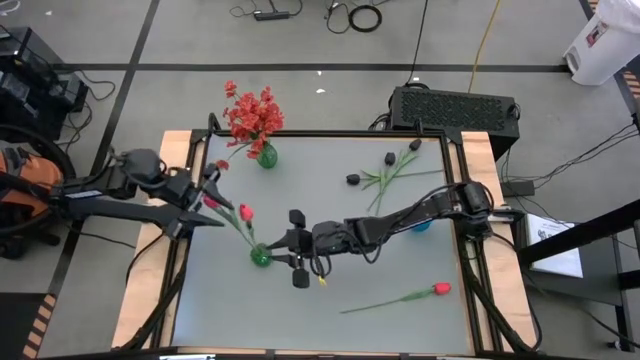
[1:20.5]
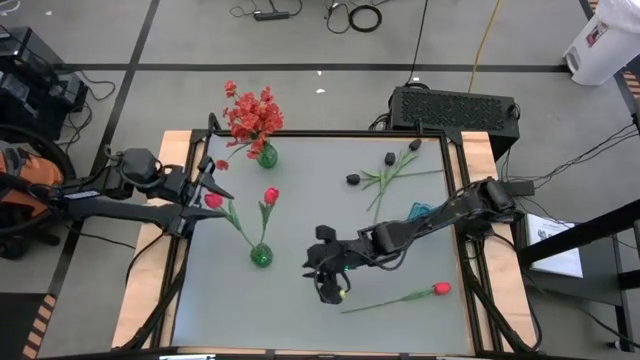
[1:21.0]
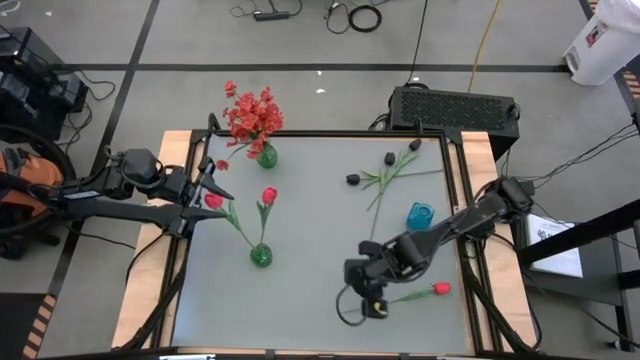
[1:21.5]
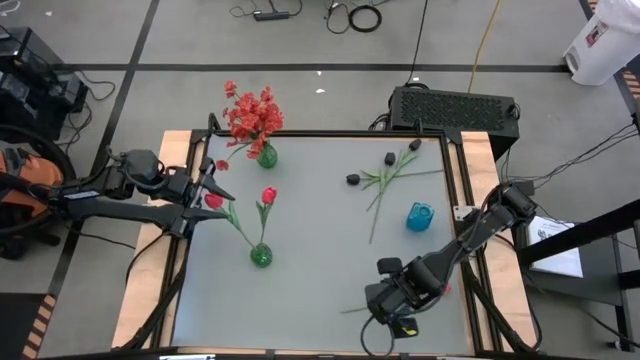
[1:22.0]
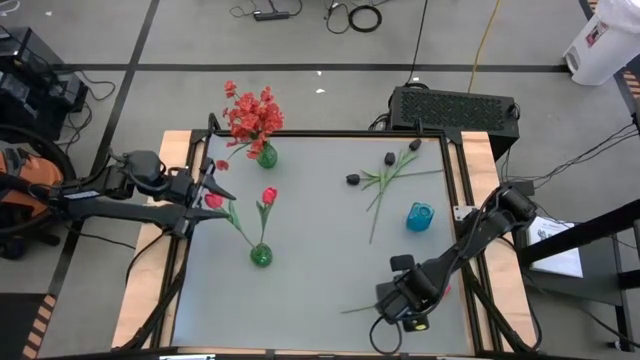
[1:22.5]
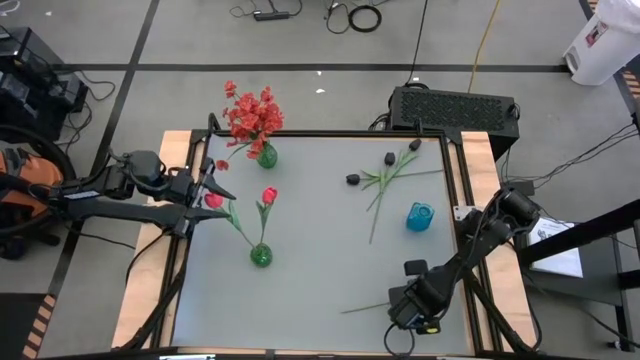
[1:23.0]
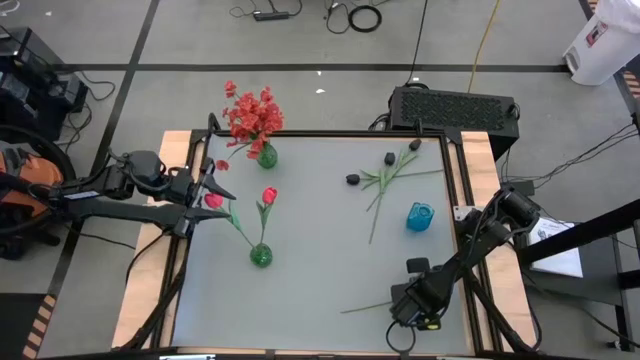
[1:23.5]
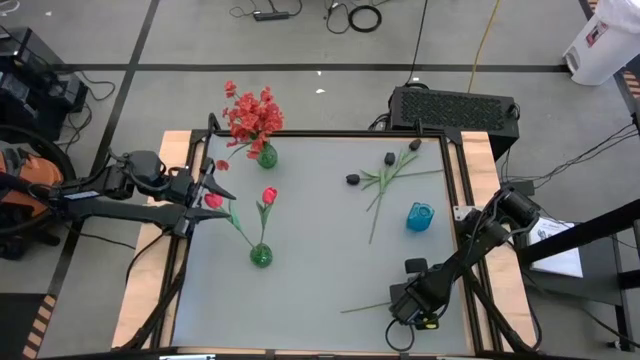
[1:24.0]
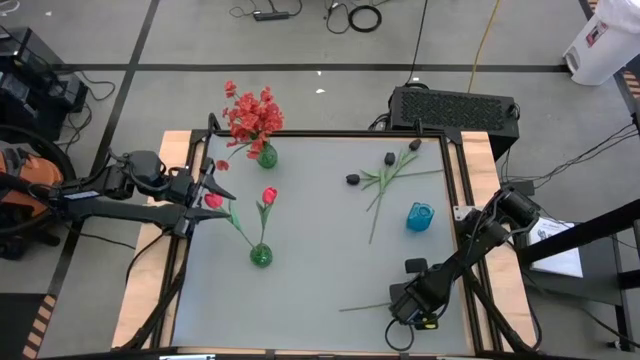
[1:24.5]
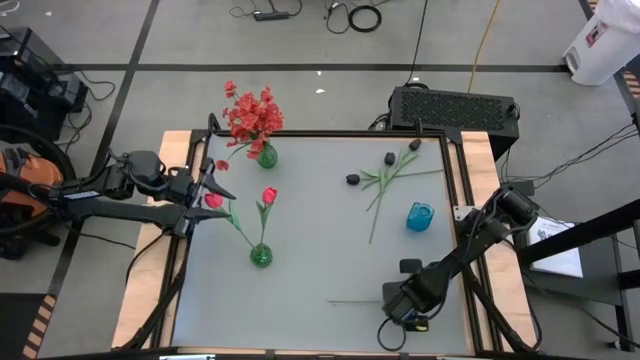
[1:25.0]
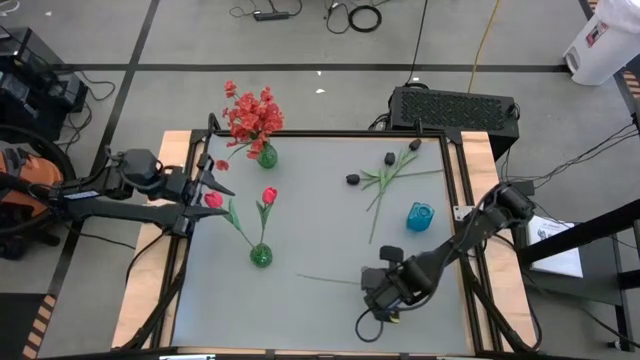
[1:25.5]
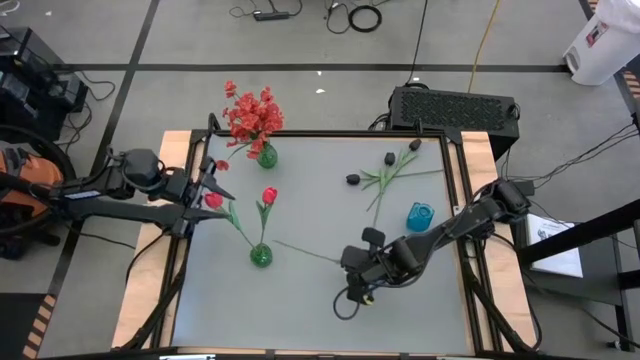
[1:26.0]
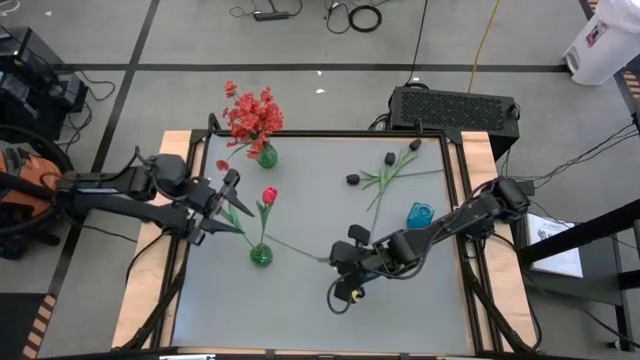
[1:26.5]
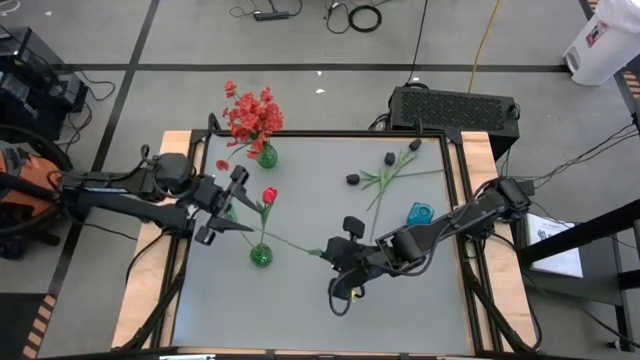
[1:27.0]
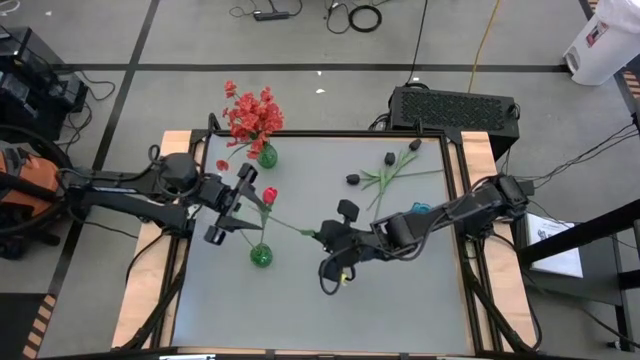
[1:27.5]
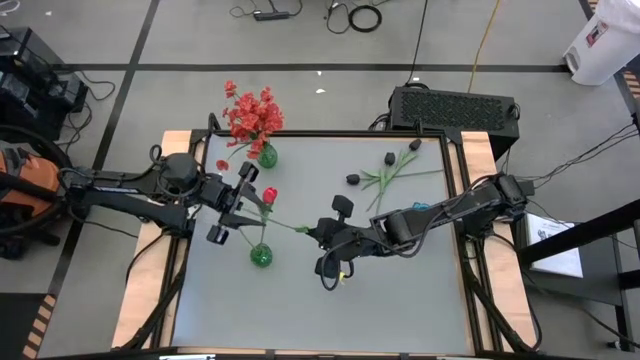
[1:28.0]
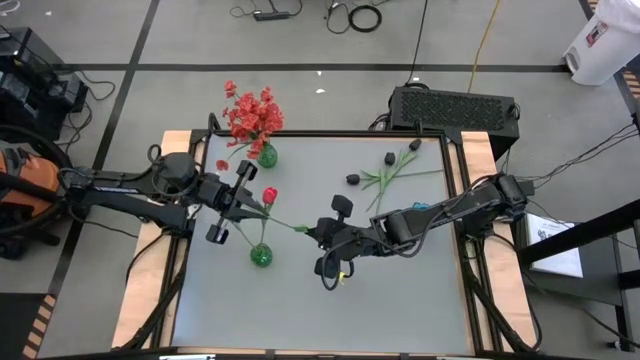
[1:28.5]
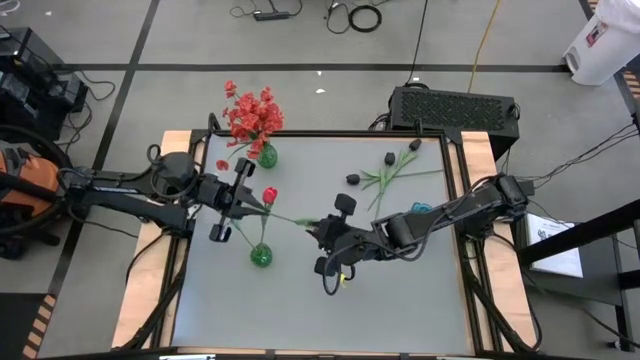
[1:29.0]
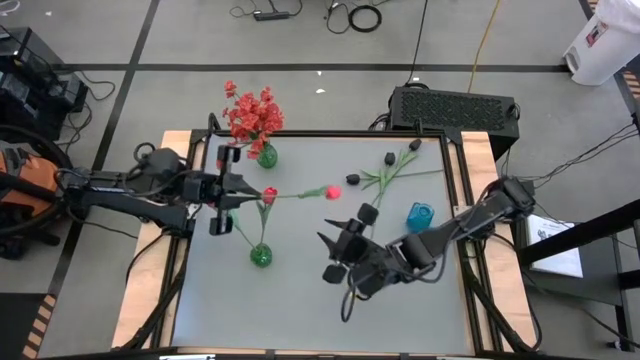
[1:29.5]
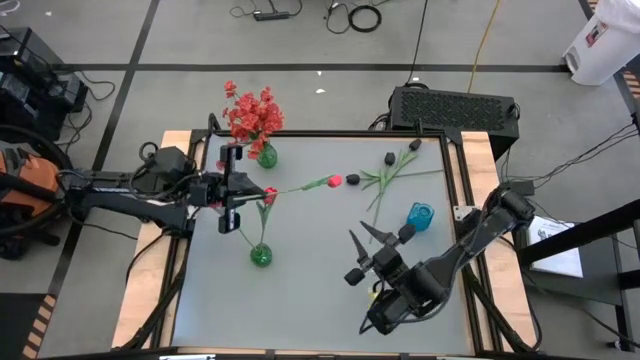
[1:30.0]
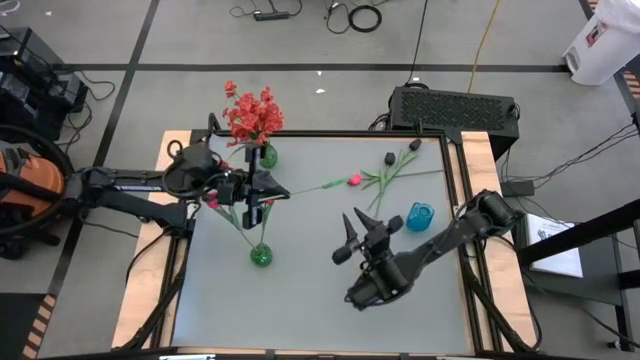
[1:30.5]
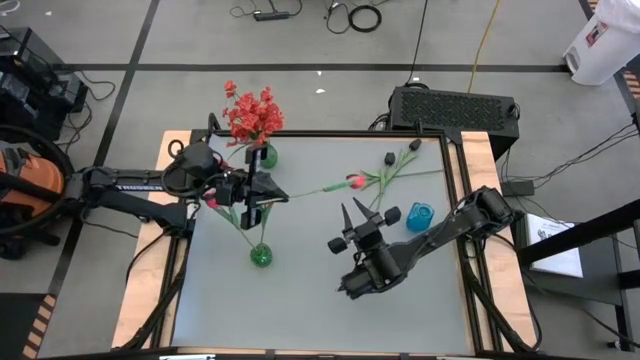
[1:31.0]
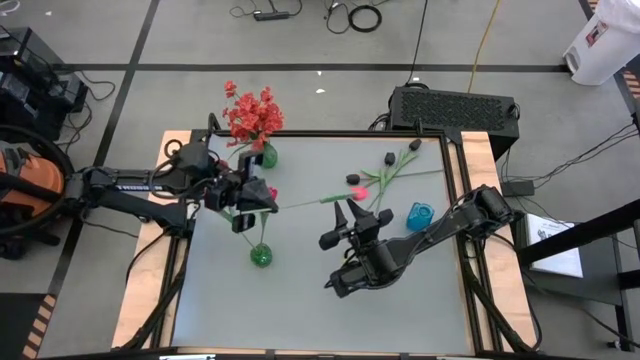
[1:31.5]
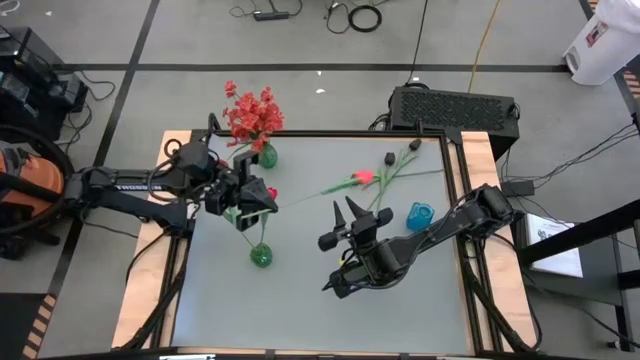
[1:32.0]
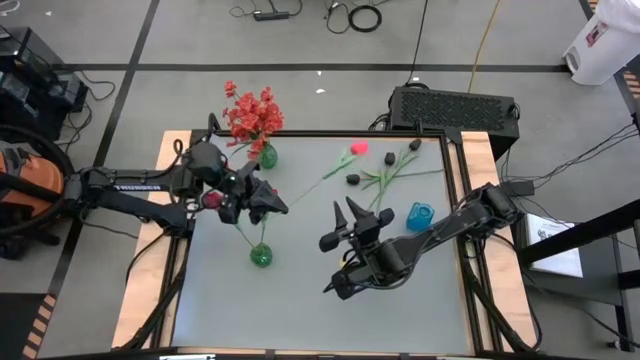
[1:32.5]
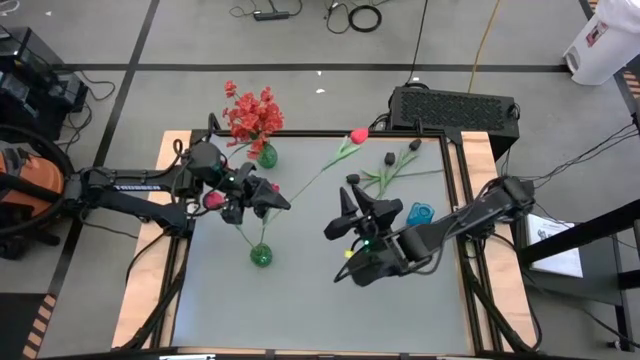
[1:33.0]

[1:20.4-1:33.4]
Task: Sort flowers into vase by color
Put the red flower into the bottom green vase

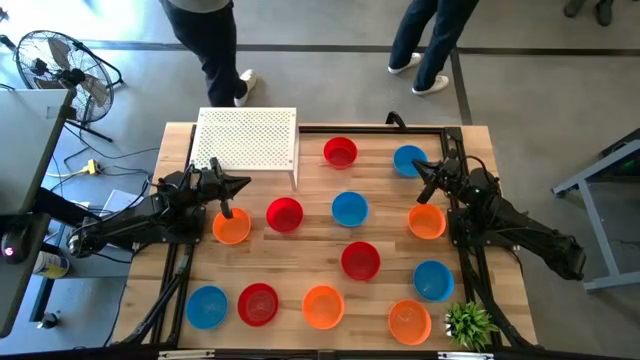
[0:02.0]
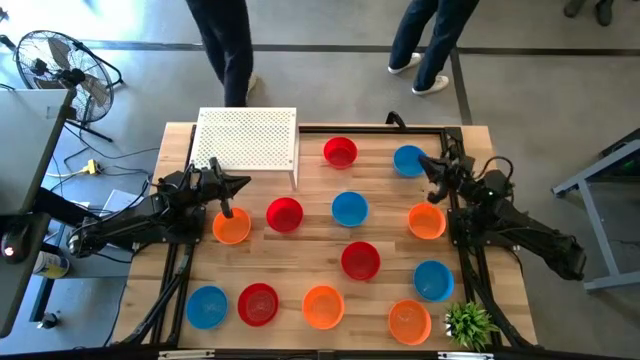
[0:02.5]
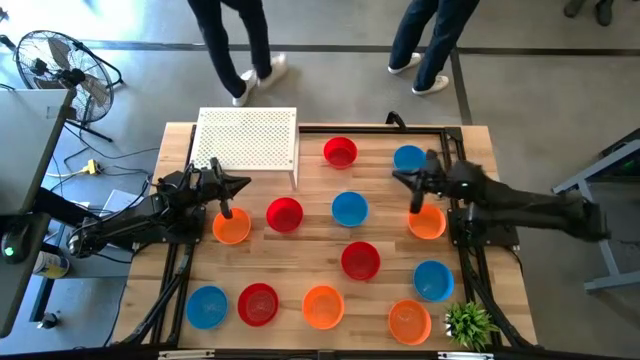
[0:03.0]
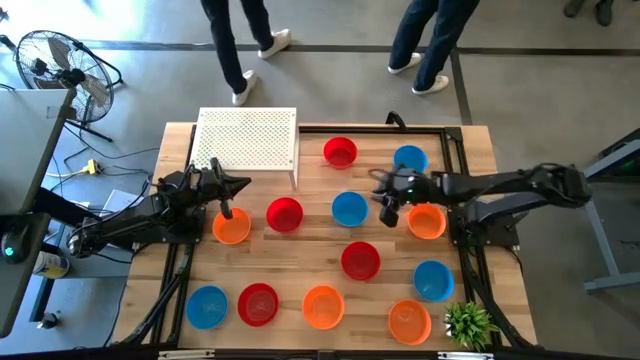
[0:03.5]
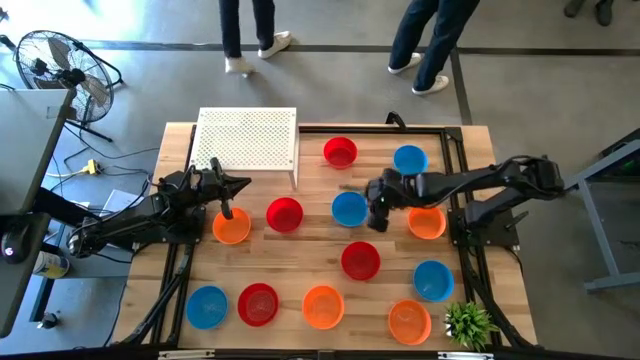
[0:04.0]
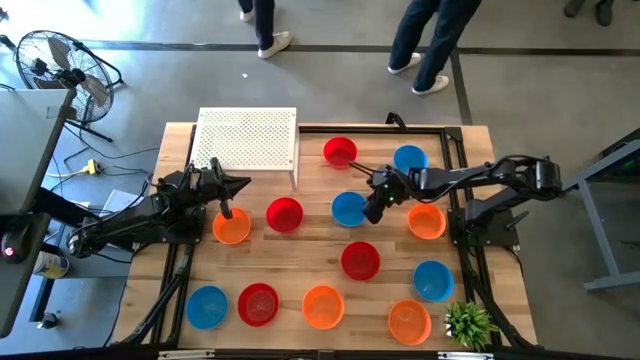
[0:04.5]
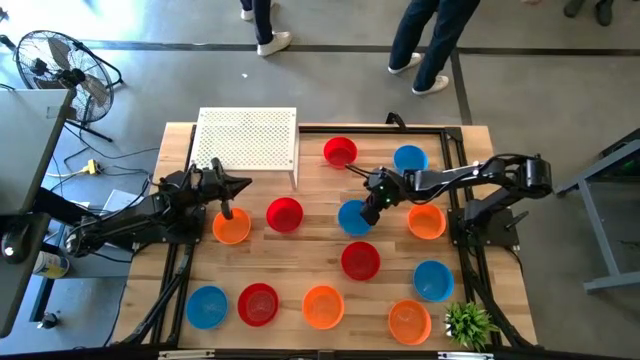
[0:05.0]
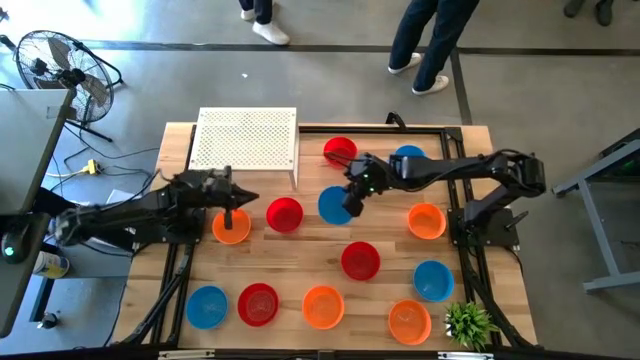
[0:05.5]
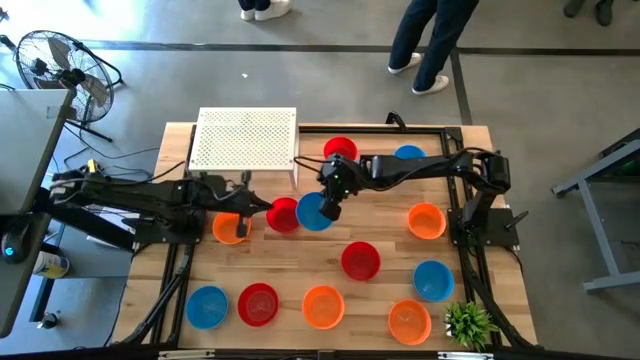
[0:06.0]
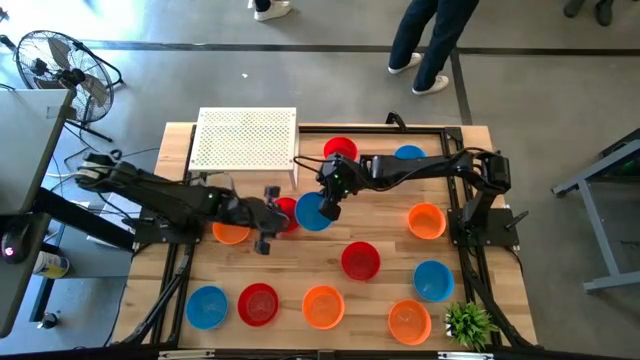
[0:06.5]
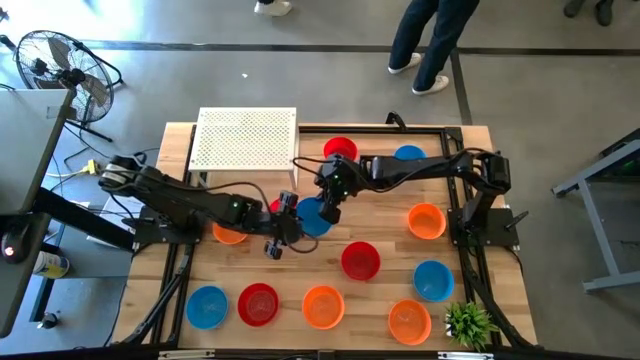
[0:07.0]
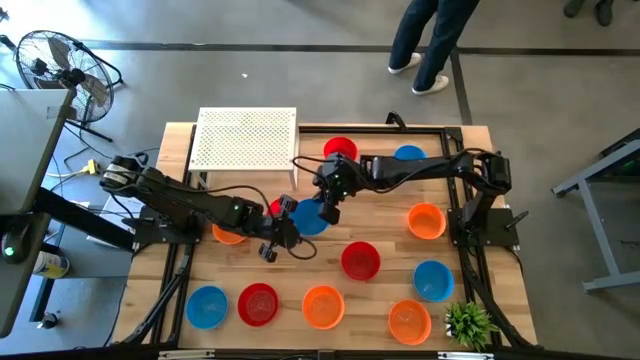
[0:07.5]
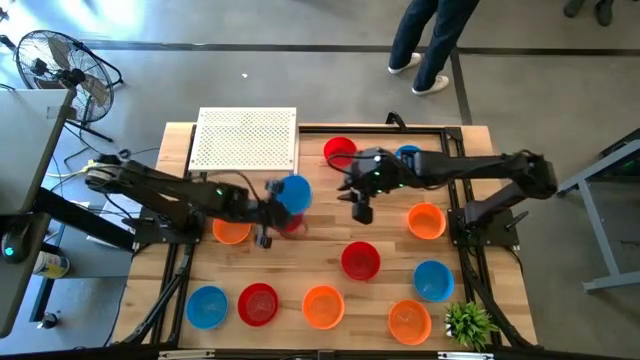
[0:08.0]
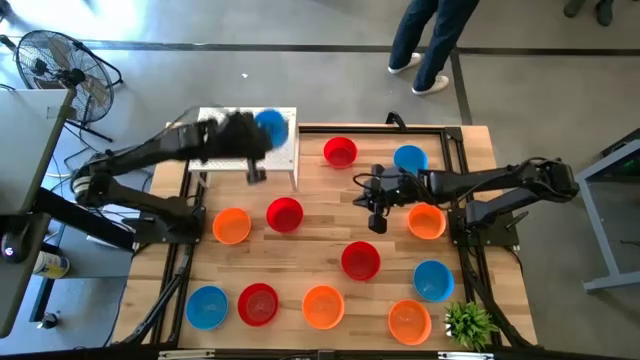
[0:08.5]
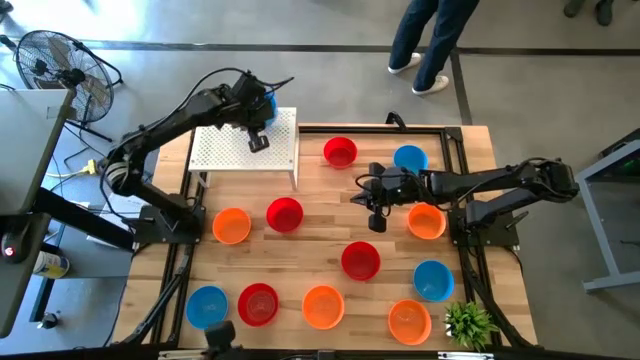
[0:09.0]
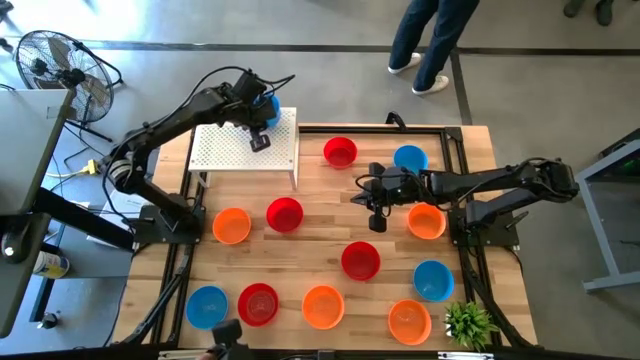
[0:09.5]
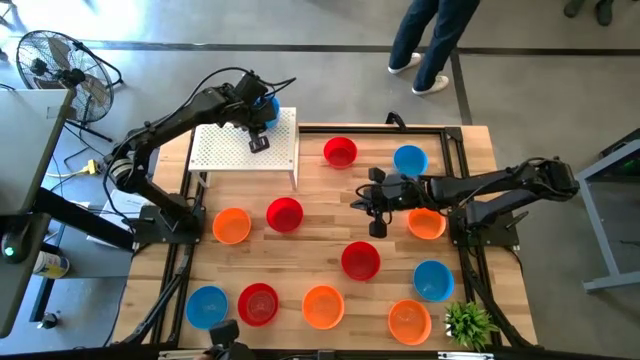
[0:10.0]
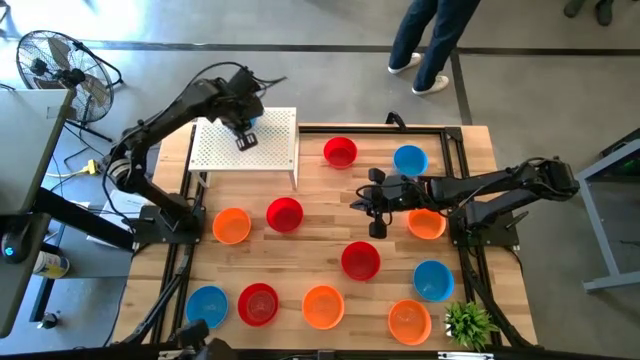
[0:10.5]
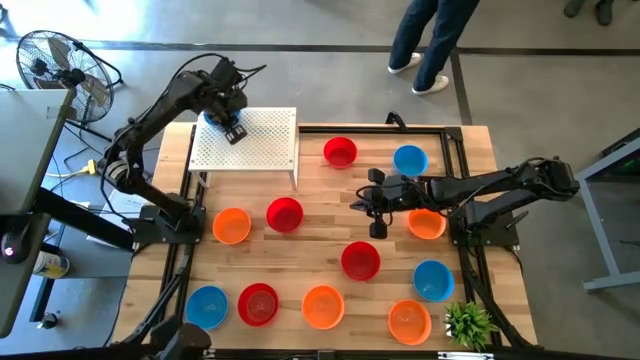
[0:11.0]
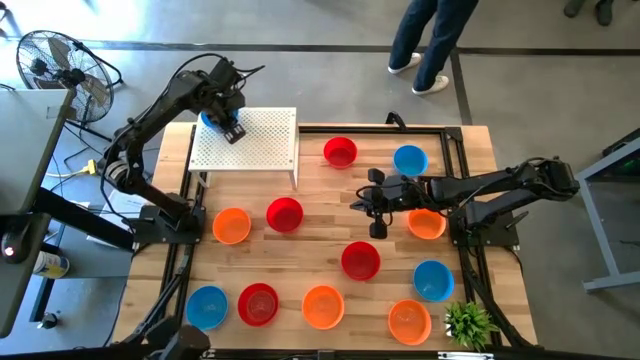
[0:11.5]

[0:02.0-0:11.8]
Task: Pick & Place Mini bowls
Put the blue bowl on the shelf
